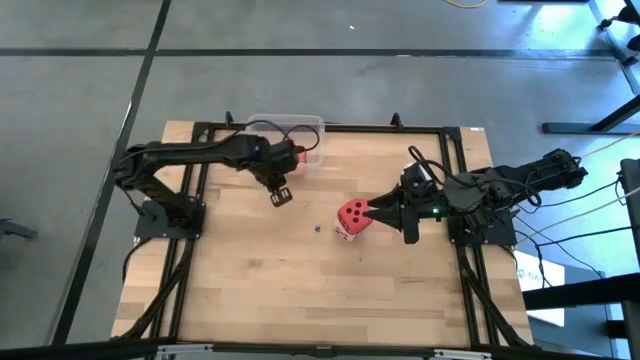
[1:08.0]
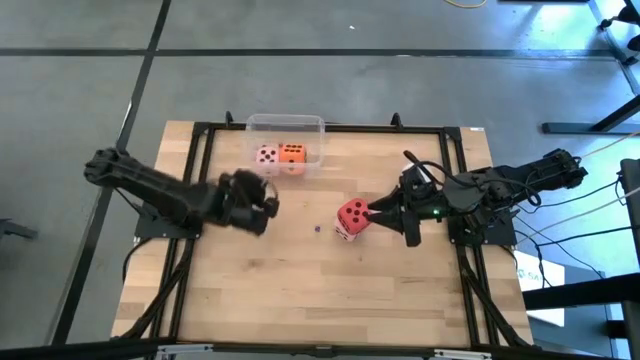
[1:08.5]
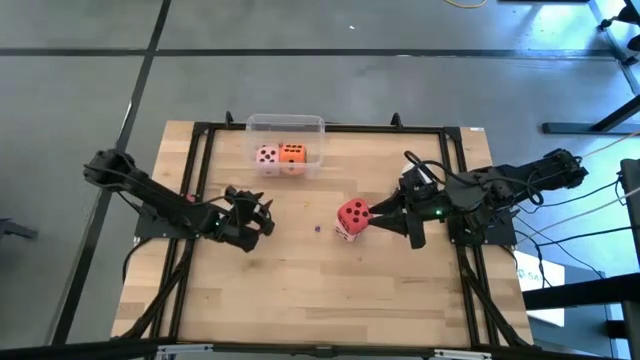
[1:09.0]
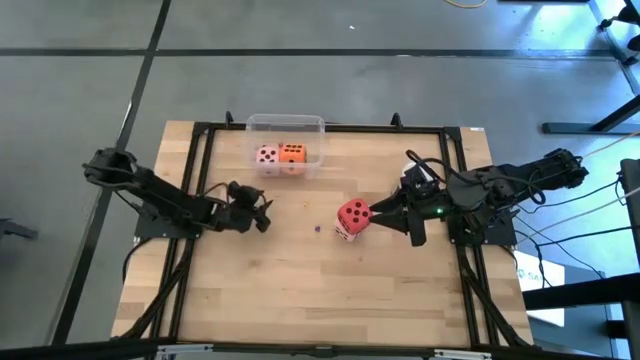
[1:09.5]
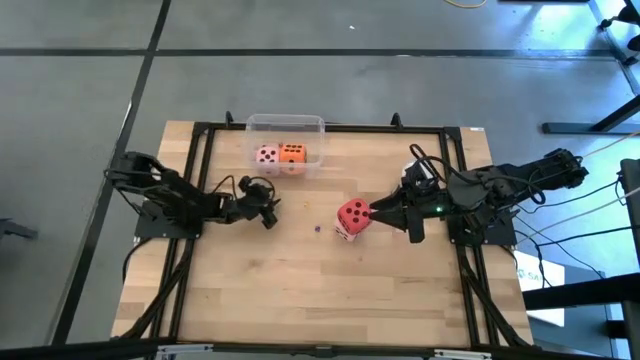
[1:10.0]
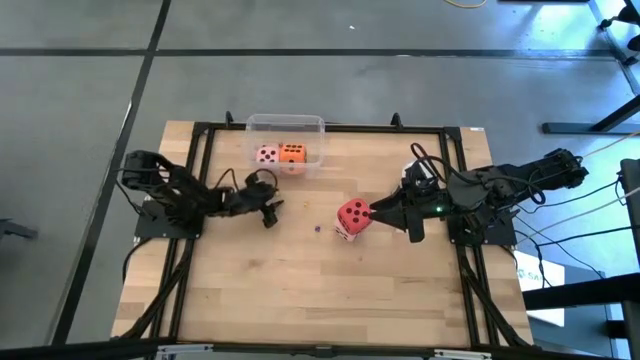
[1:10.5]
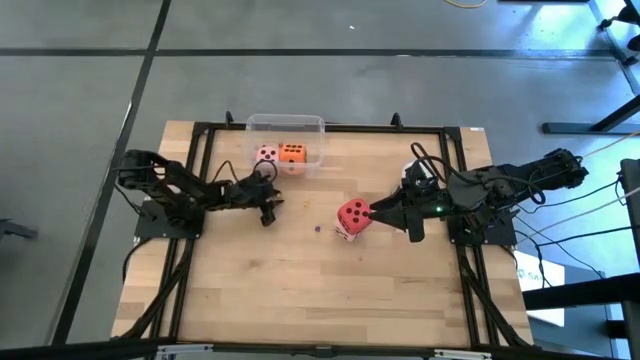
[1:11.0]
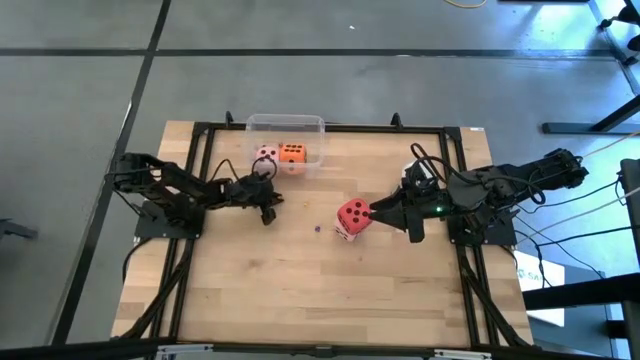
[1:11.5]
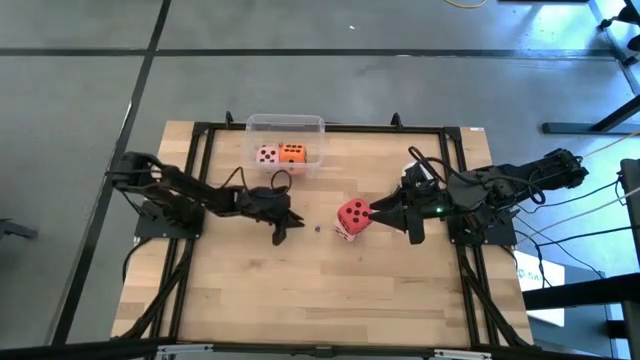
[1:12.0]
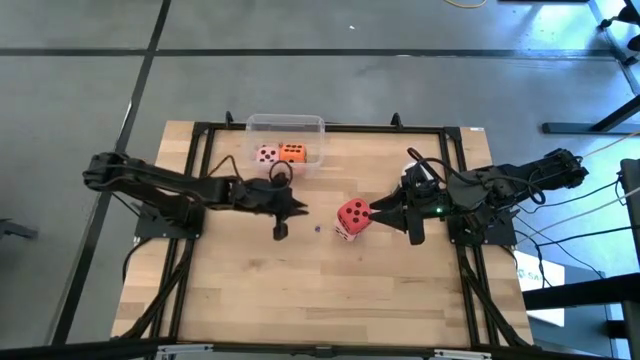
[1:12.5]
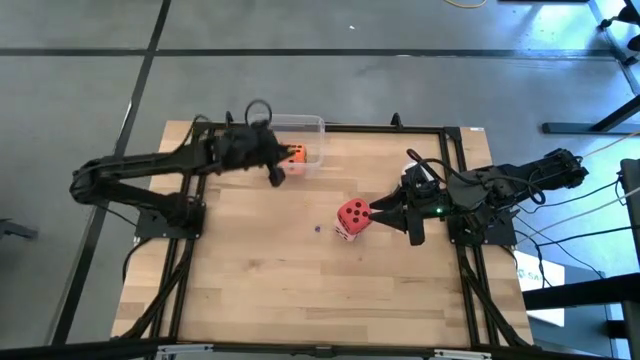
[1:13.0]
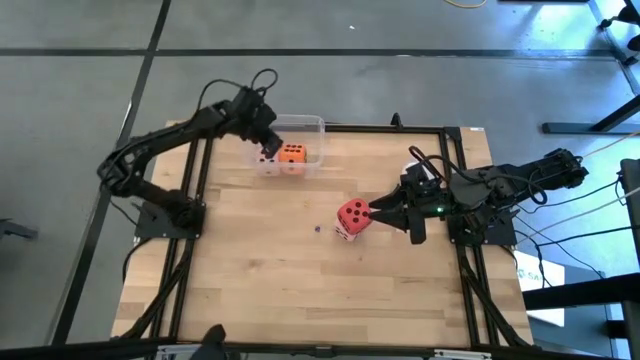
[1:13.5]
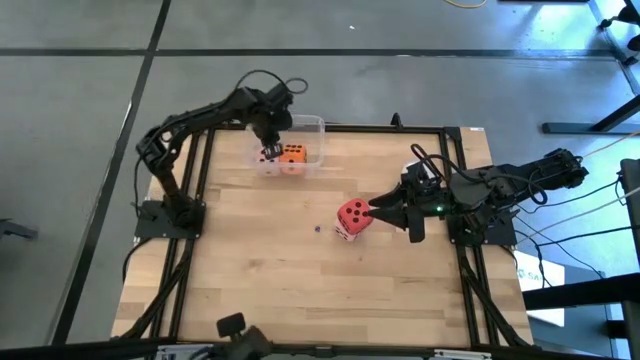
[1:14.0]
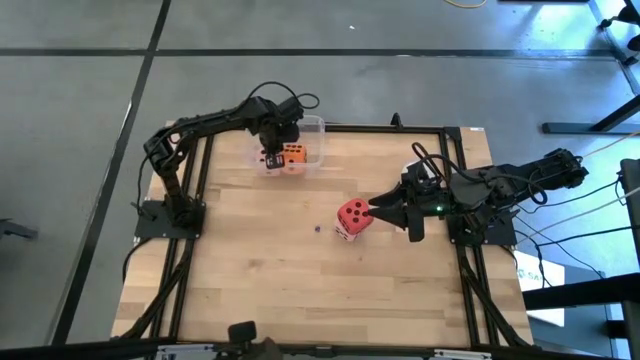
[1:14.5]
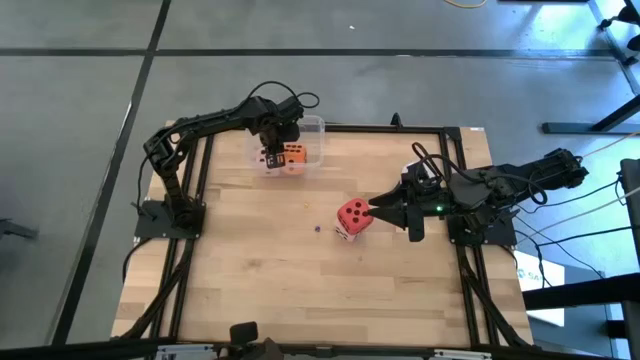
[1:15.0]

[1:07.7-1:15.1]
Task: Pick & Place Dice
Put the small green dice into the transparent bin

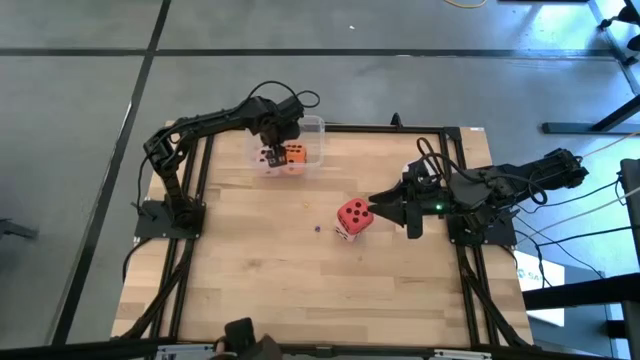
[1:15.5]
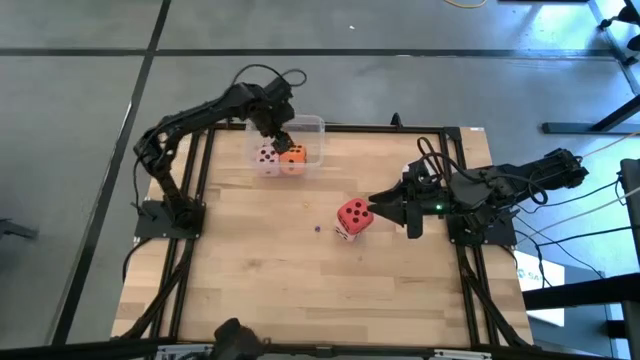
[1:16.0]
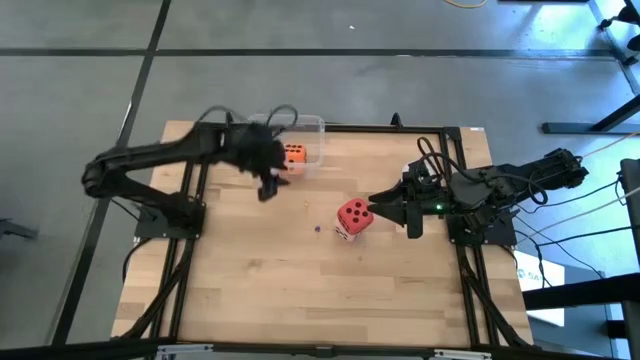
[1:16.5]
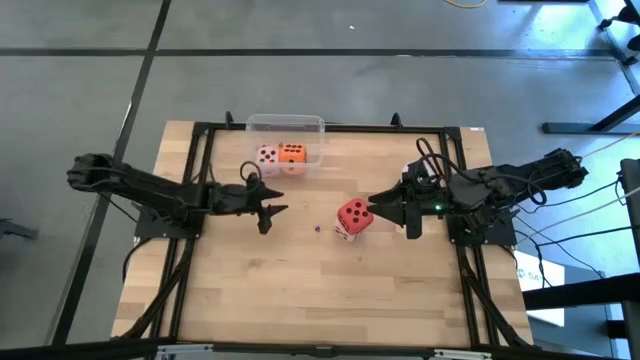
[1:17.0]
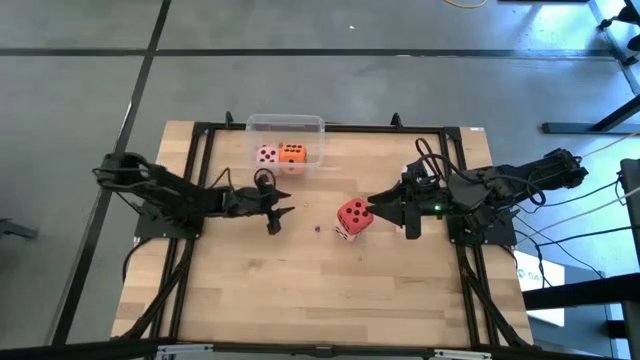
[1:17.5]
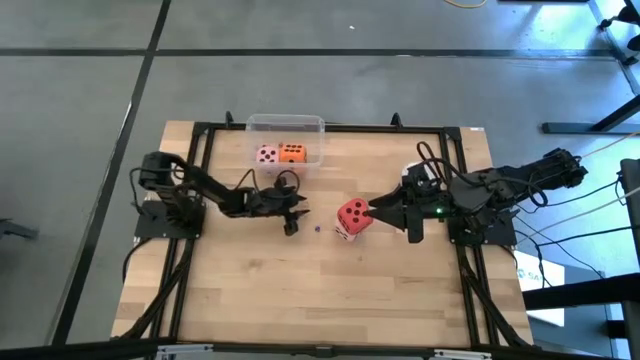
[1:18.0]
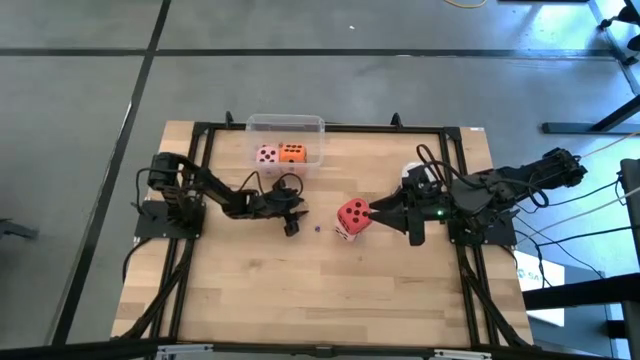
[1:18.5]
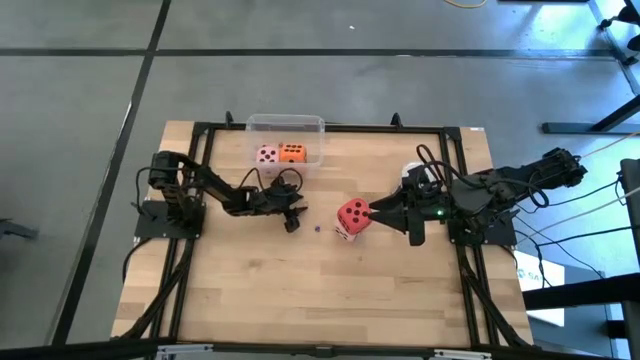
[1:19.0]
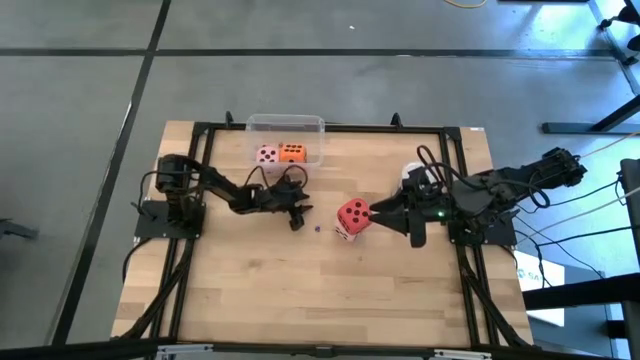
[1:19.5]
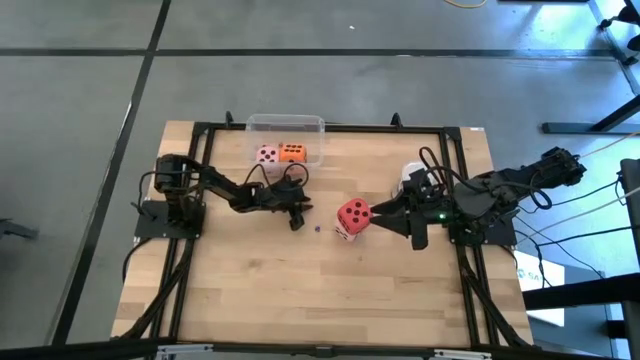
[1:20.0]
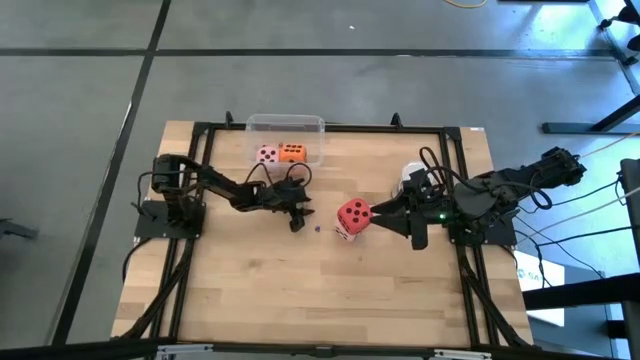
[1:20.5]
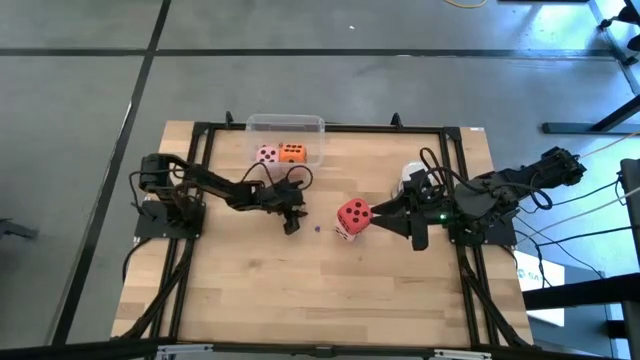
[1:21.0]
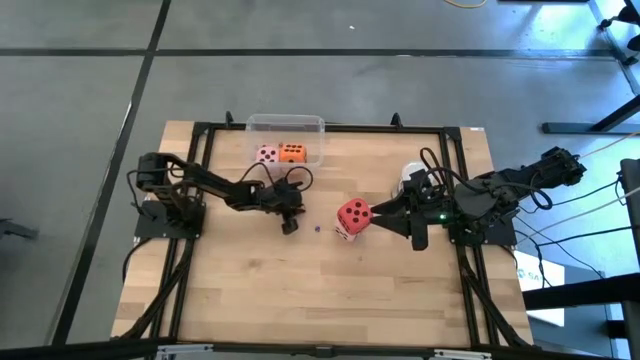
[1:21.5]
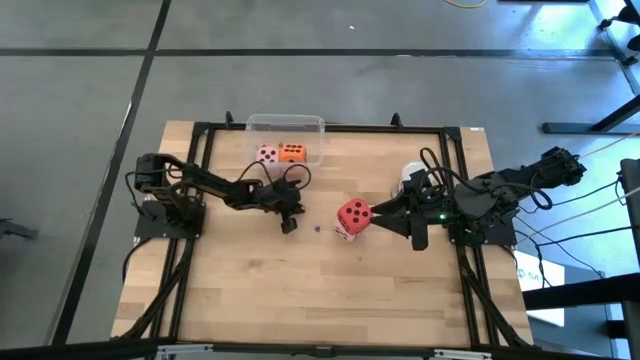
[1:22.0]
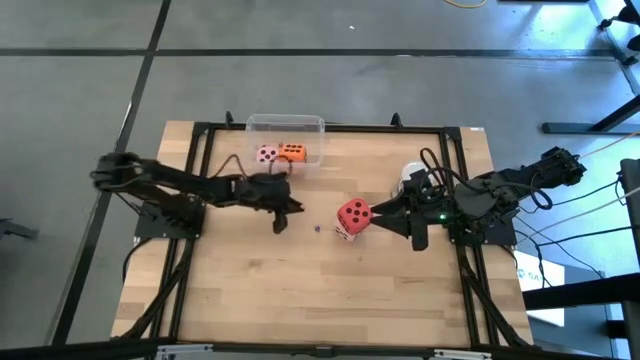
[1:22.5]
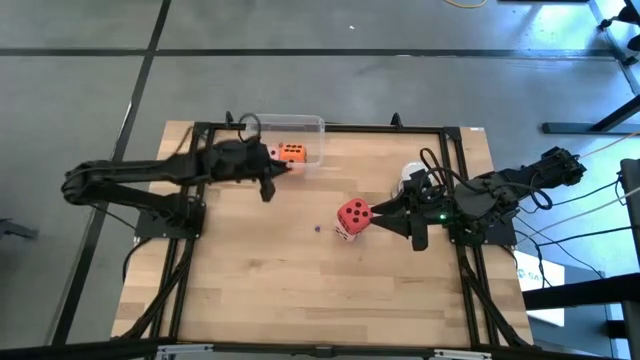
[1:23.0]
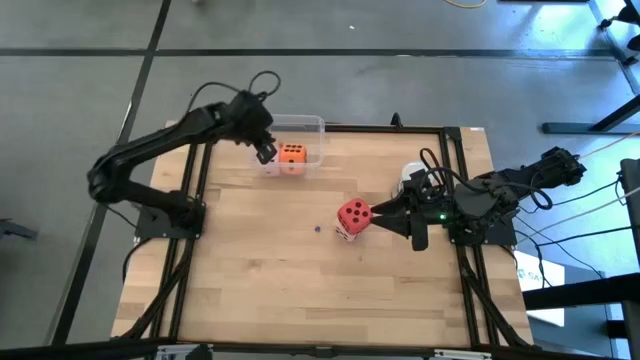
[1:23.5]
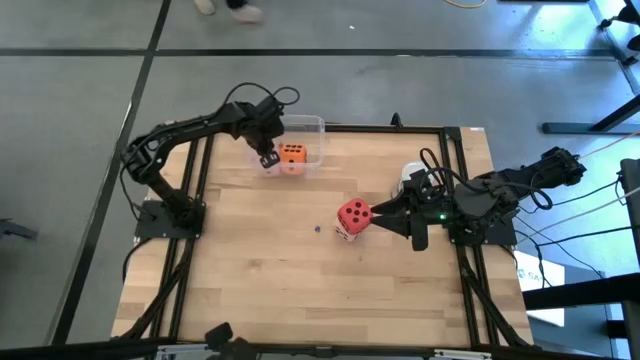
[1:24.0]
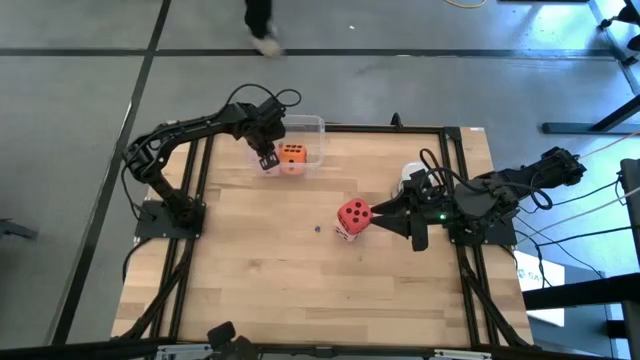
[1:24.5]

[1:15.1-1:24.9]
Put the small yellow dice into the transparent bin

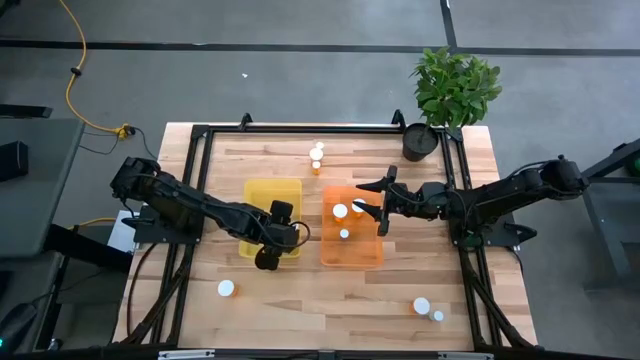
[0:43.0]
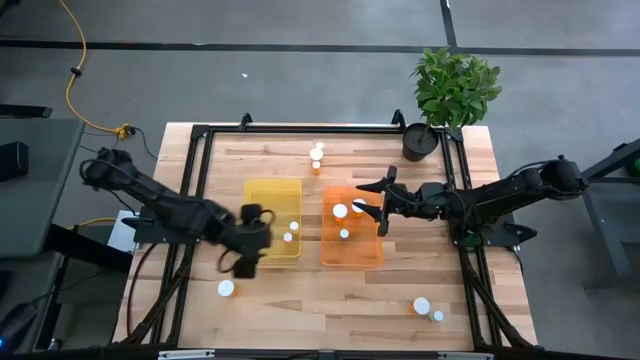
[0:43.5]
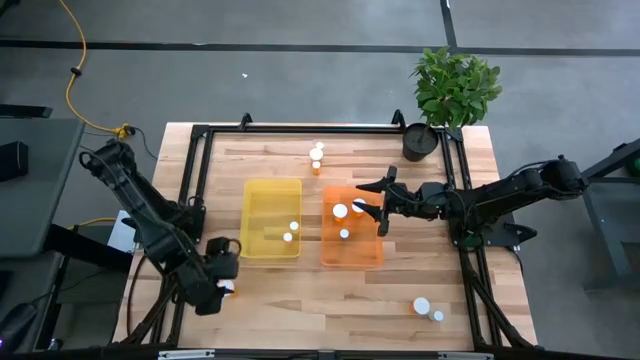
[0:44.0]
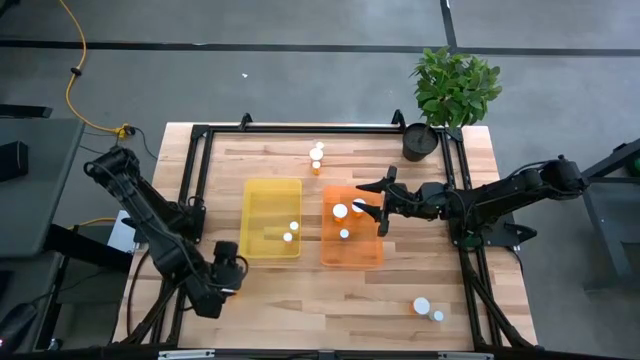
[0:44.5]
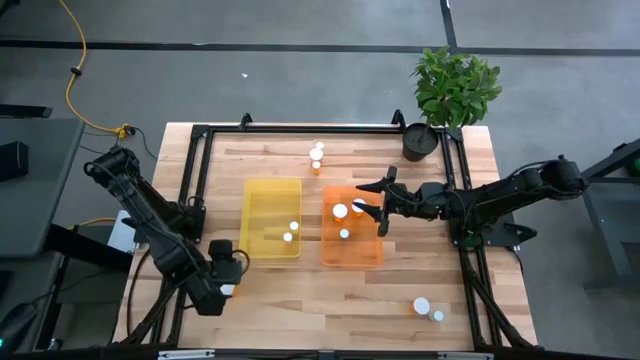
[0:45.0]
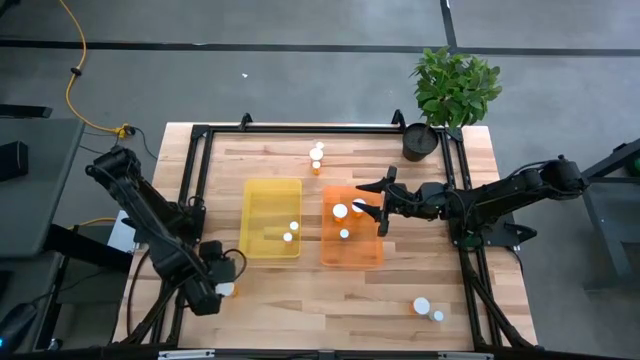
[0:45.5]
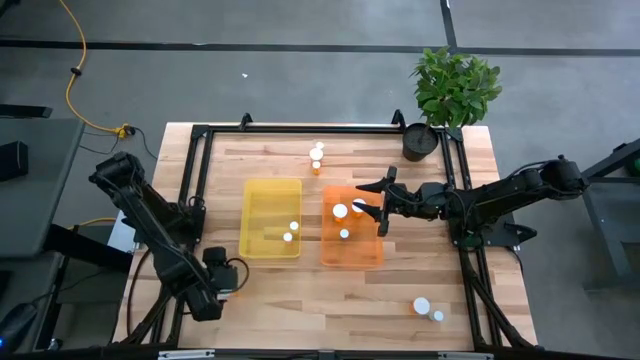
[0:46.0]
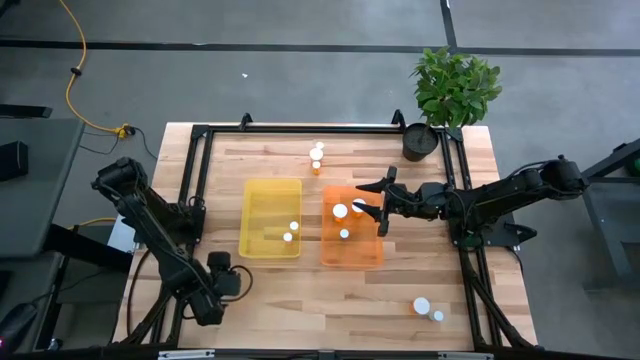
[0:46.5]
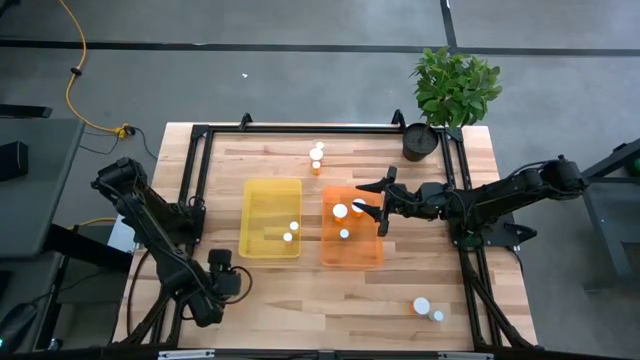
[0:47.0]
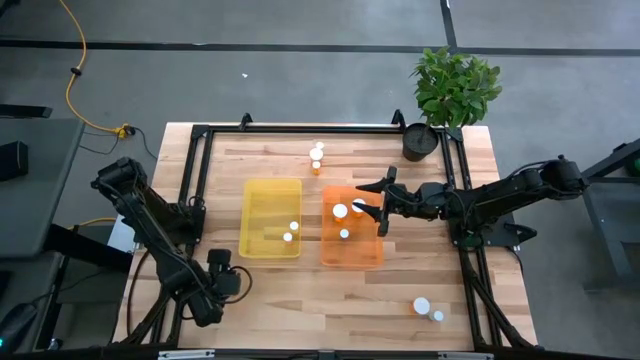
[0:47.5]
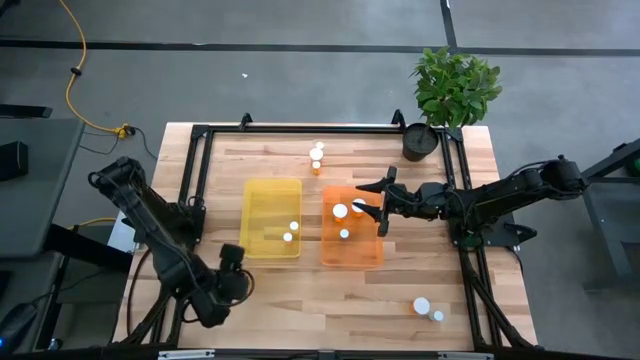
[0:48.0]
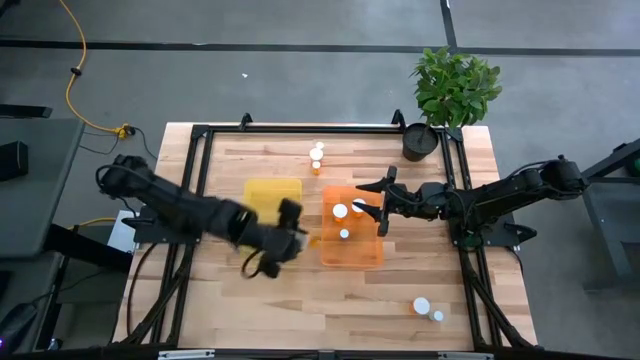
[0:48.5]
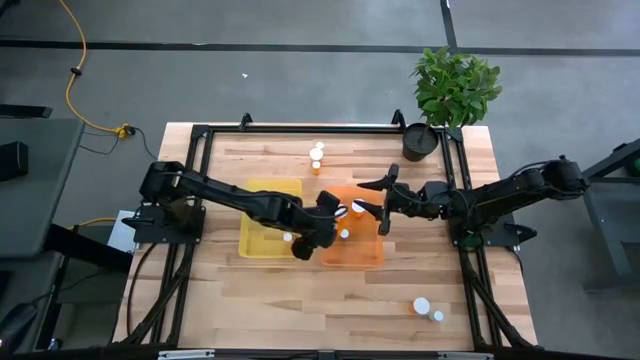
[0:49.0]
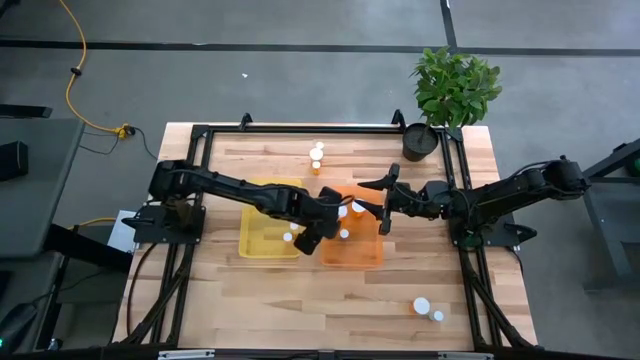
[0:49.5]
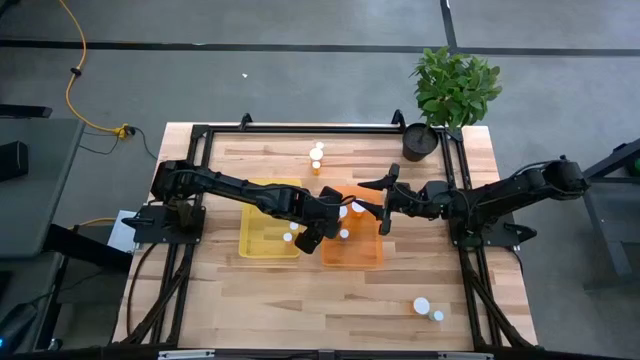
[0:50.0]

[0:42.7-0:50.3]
Task: Pick and place medicine bottles into bin by pill shape (circle, oval)
Put the pink bottle pill into the left bin
